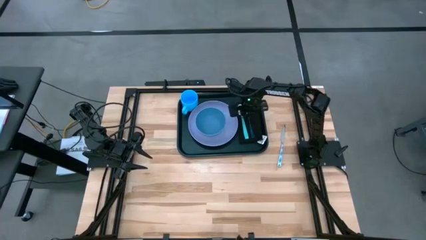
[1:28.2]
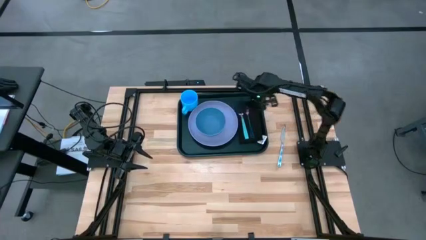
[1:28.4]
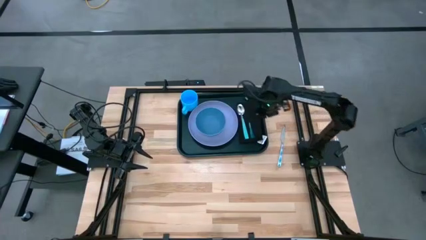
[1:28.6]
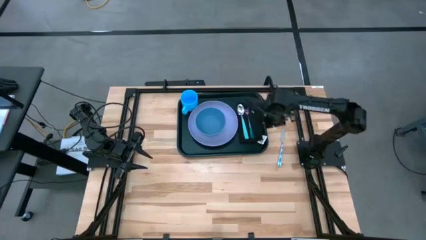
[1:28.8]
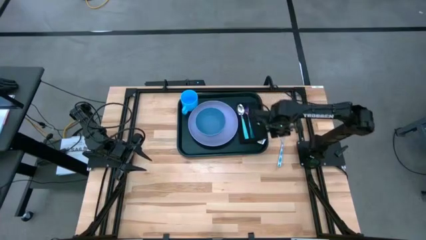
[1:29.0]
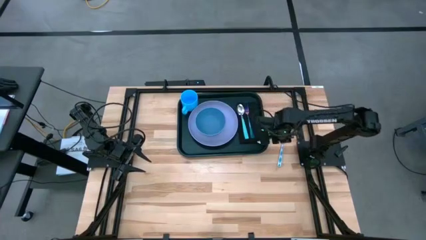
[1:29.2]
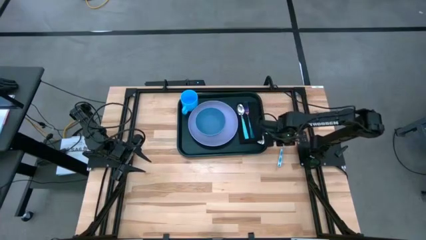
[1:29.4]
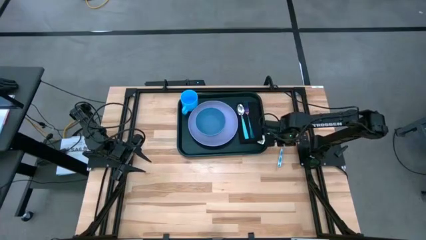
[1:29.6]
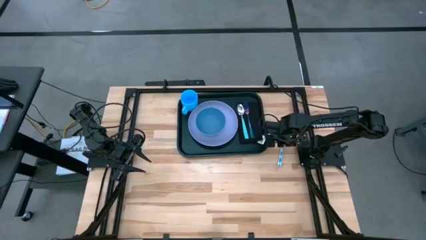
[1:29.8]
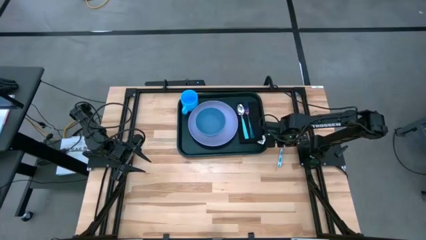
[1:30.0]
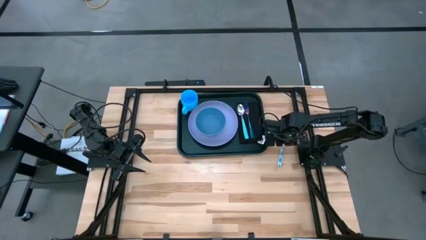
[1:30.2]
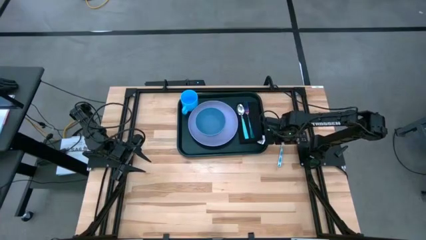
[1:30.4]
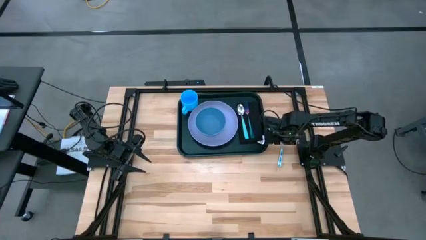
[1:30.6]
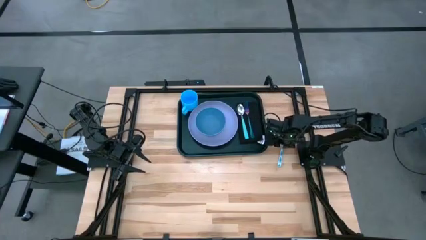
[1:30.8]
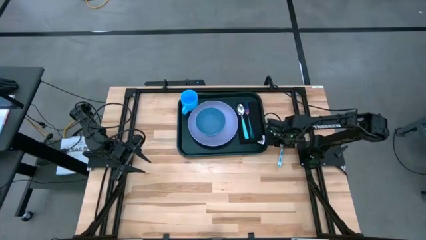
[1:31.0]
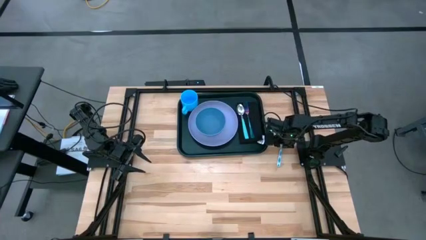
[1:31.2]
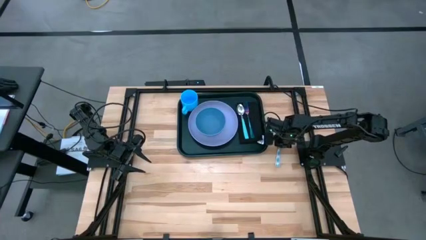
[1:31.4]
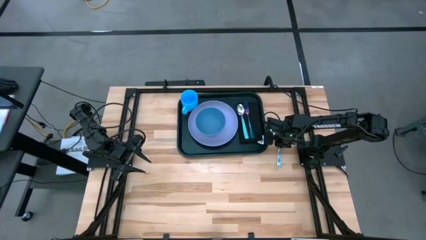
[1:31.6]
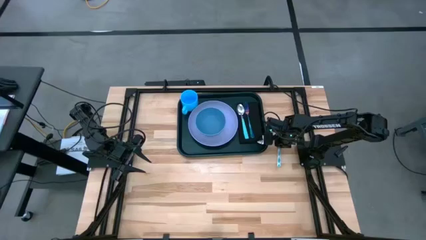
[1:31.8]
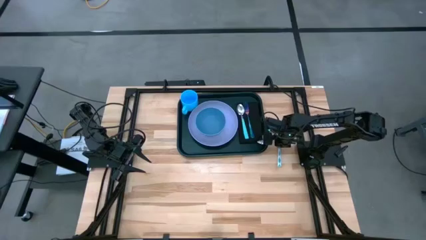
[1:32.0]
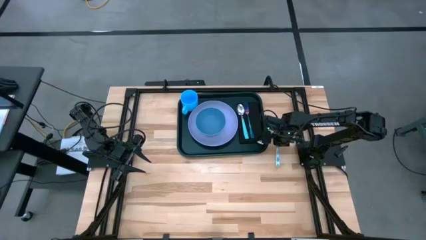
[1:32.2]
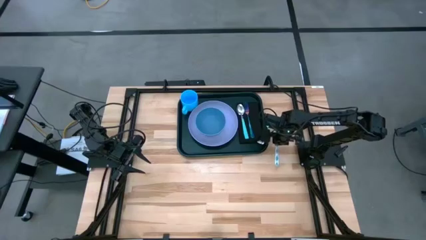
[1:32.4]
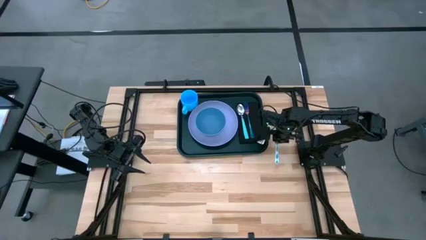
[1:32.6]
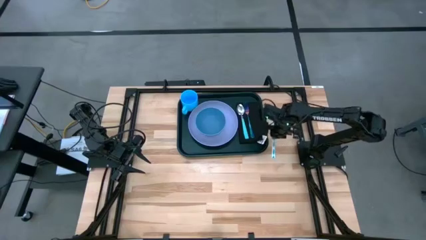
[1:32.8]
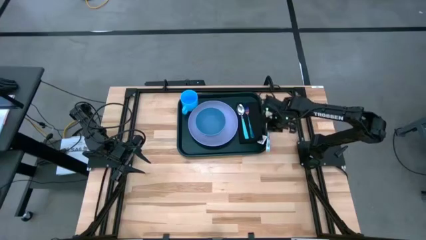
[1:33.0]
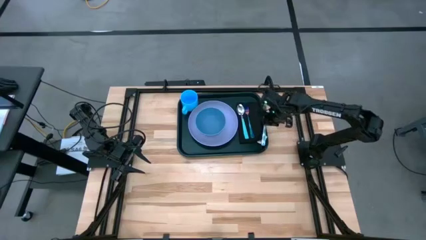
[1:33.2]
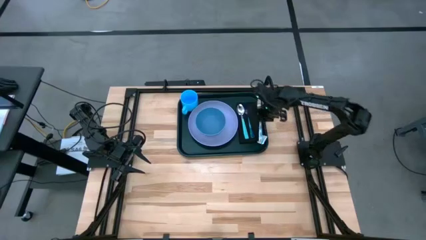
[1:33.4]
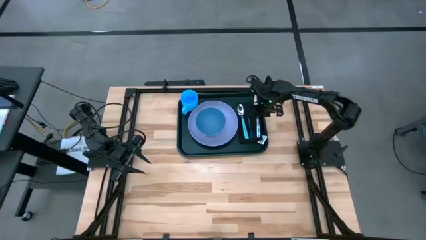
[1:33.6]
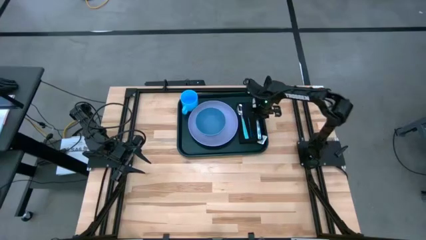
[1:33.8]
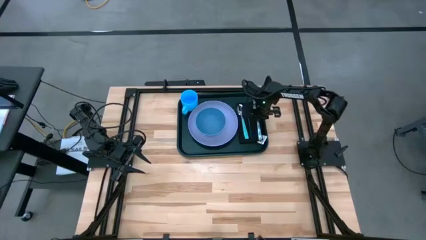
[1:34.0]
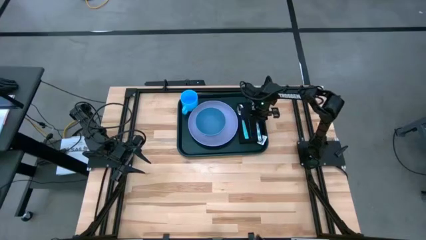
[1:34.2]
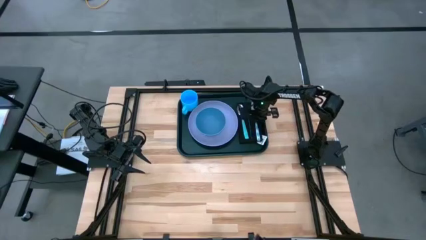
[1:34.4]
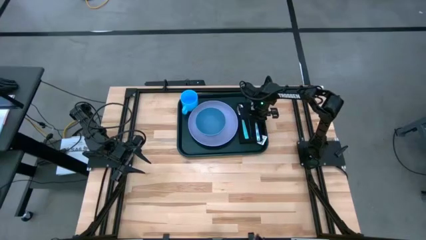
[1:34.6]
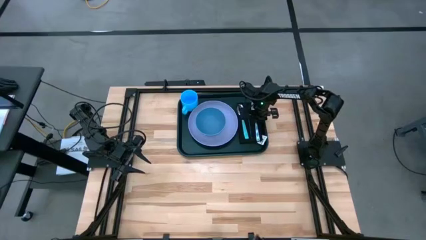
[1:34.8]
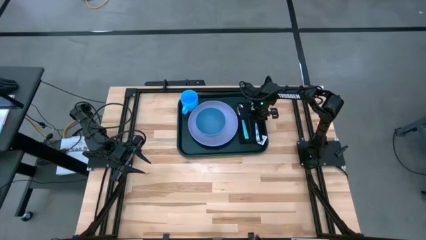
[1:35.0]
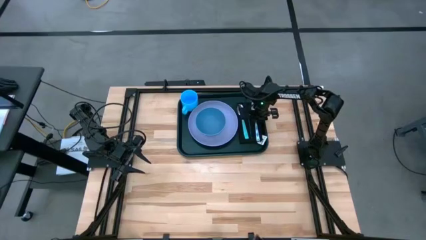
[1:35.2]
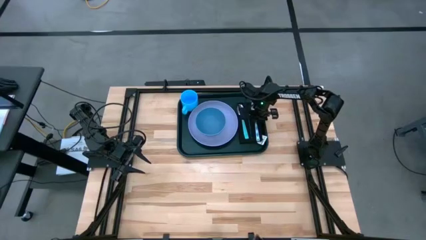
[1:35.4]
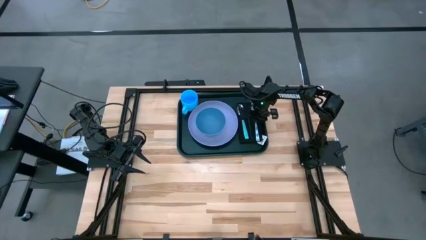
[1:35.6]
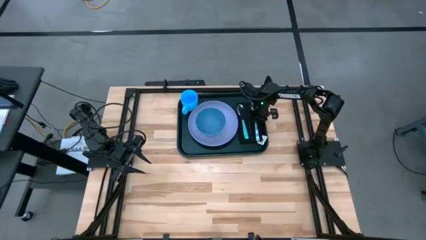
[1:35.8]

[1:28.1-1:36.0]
Task: Set up tray
Put the blue patterned table knife to the right of the purple fork on the black table napkin

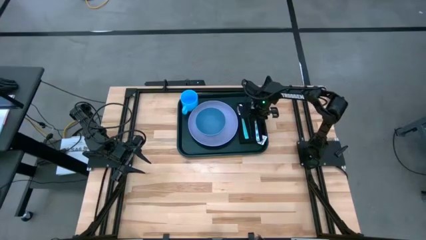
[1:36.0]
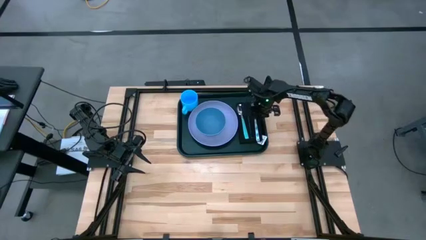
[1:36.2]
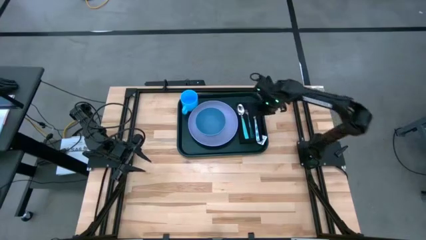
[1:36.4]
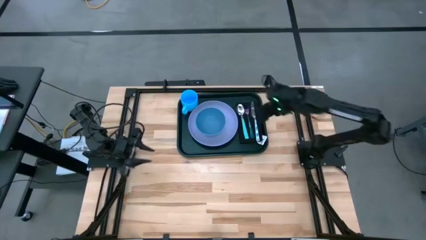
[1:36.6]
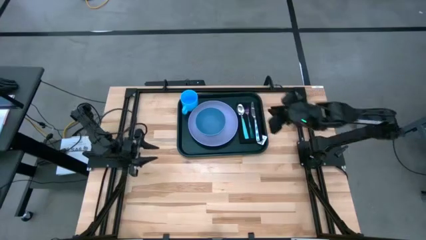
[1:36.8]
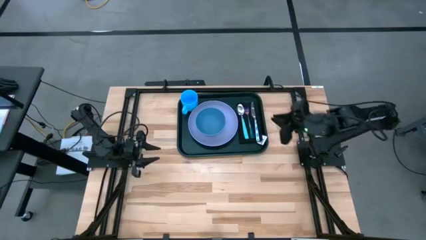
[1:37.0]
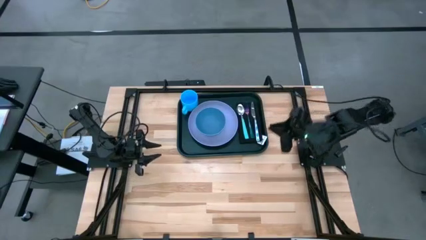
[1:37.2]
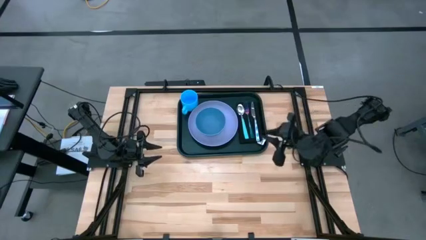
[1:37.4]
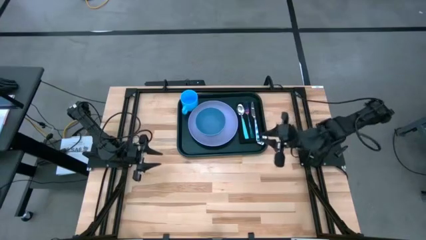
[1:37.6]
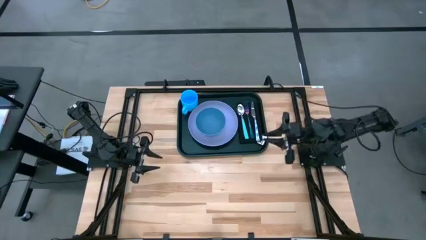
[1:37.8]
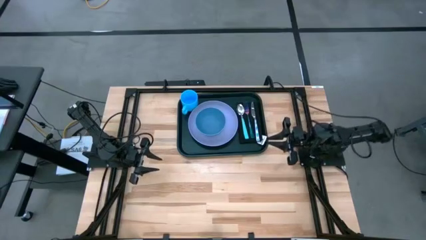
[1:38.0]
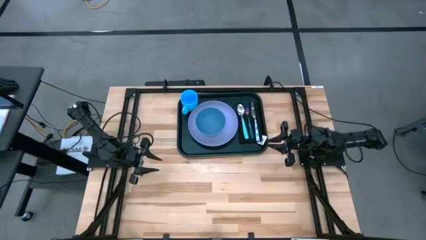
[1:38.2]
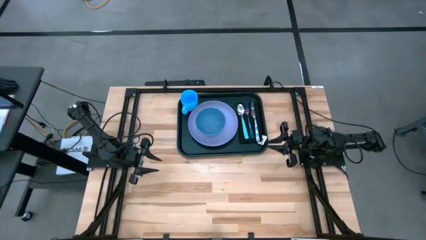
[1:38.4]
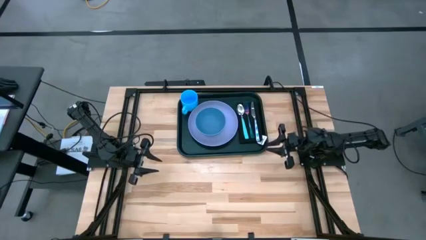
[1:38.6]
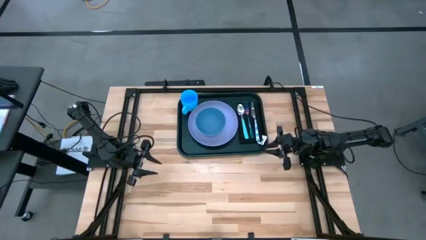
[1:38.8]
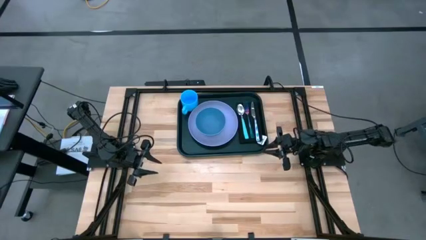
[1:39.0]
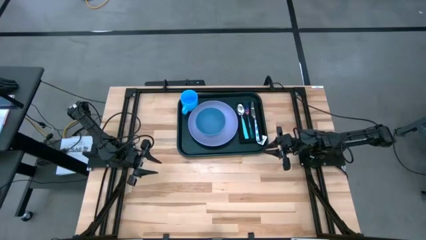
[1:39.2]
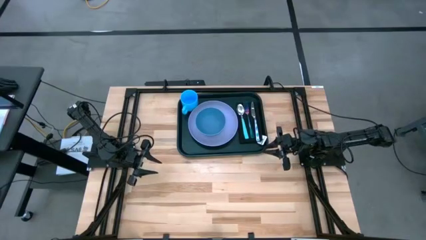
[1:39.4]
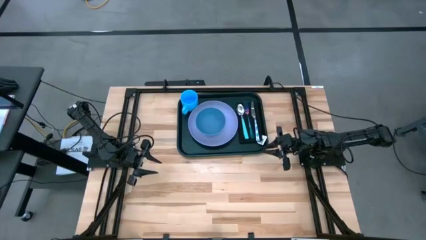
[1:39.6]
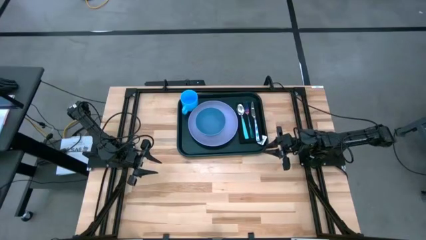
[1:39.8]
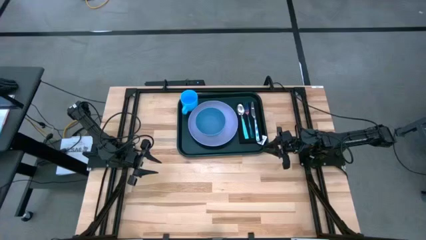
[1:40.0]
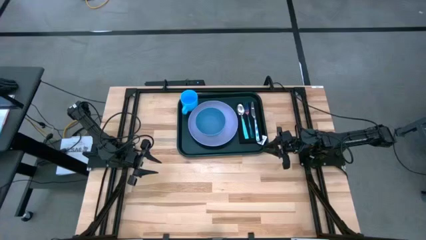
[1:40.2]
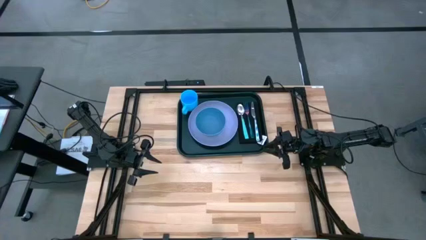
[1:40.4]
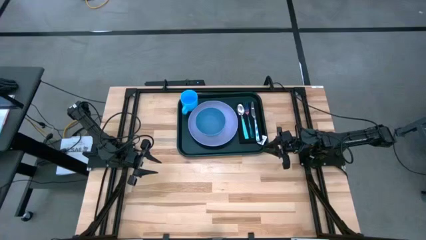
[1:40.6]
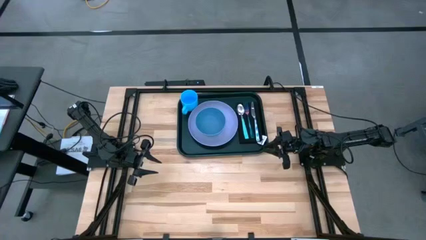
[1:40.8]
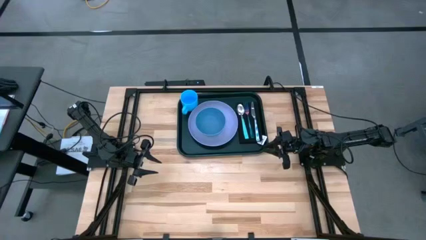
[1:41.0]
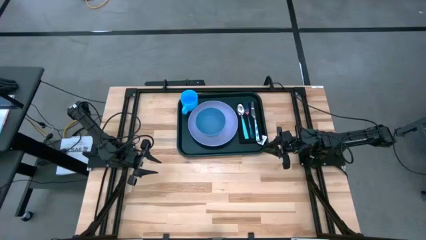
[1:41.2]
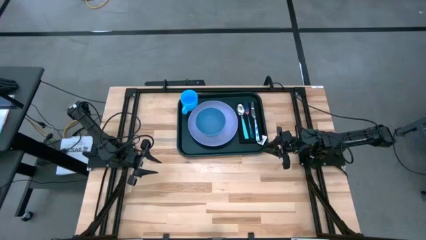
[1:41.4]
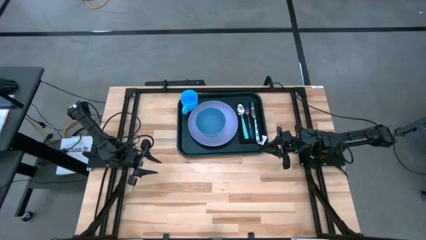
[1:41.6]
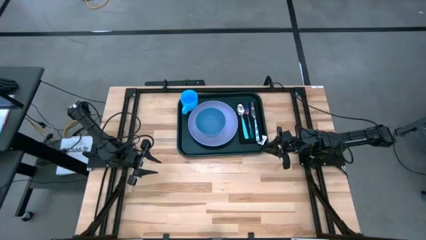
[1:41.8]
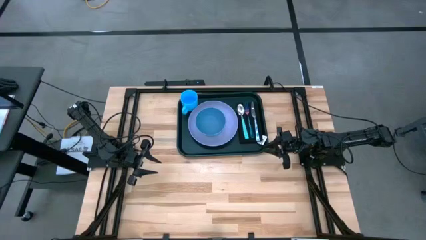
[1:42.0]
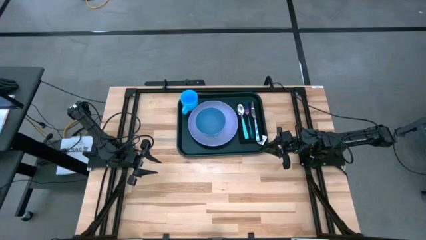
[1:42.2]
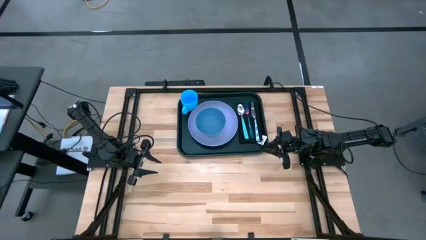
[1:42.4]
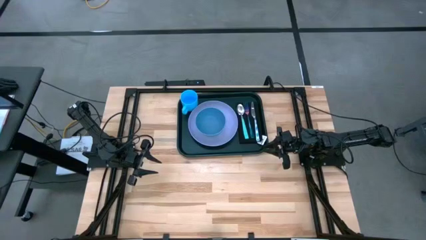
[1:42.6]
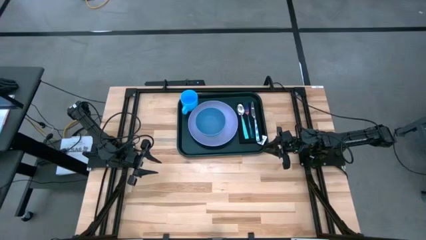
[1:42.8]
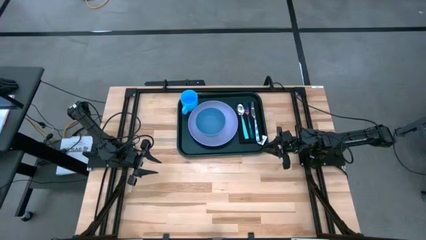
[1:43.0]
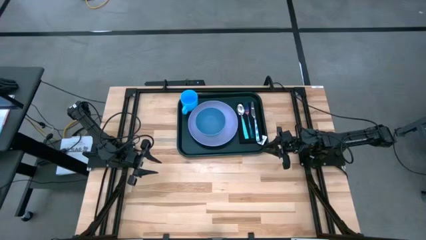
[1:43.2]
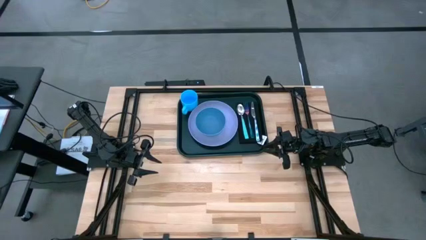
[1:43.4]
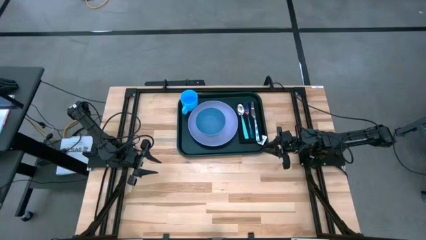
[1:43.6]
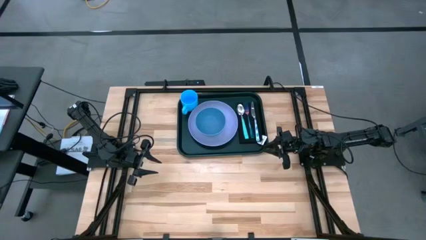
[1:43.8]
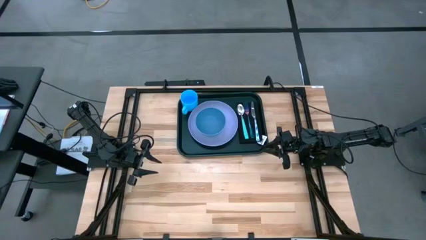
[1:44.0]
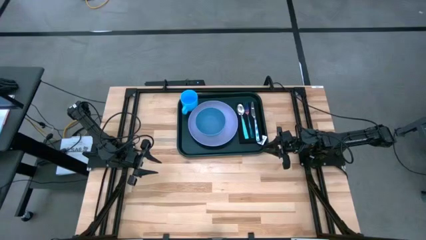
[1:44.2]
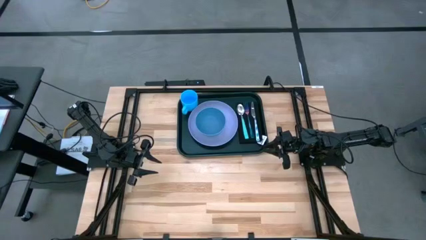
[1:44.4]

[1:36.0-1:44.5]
Return to Home Position
